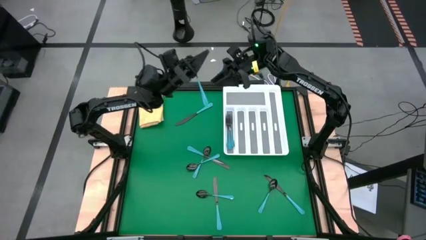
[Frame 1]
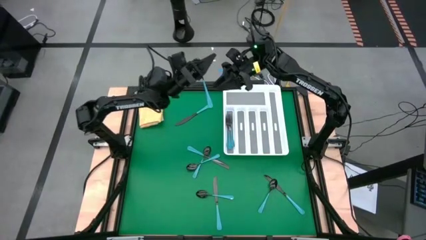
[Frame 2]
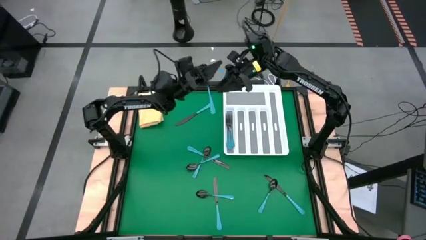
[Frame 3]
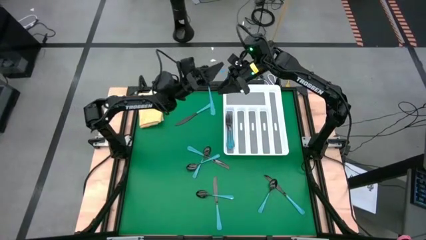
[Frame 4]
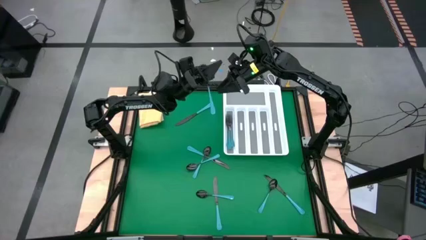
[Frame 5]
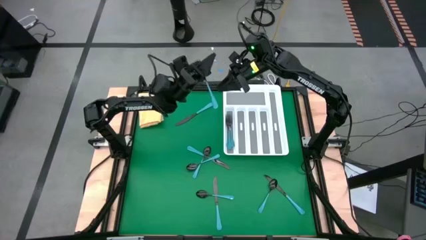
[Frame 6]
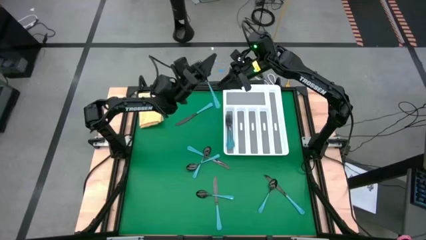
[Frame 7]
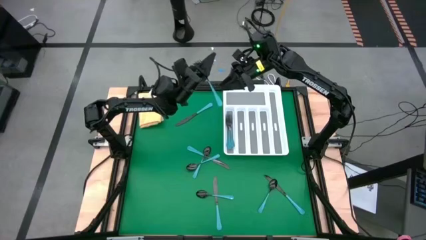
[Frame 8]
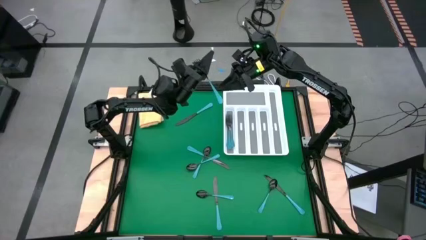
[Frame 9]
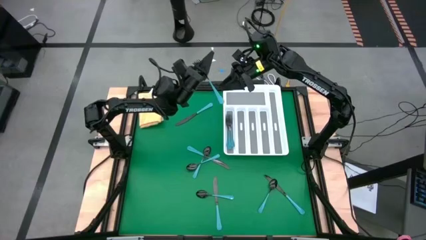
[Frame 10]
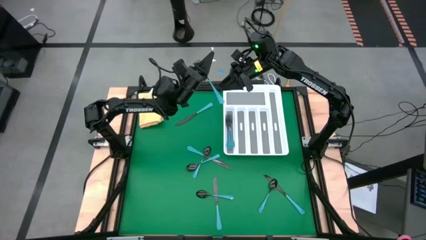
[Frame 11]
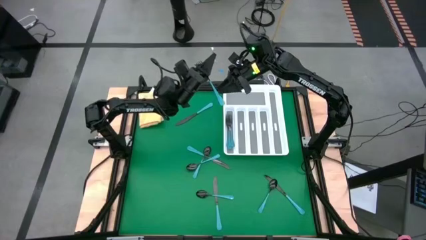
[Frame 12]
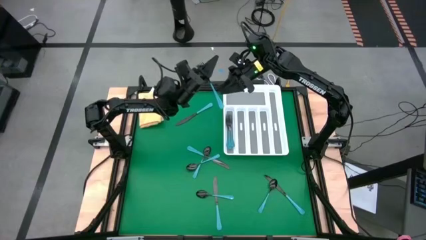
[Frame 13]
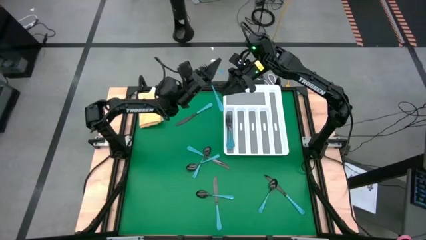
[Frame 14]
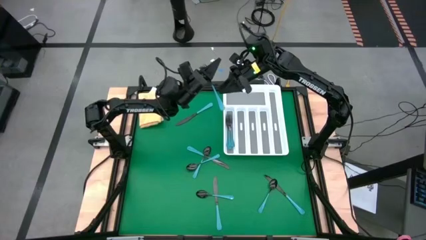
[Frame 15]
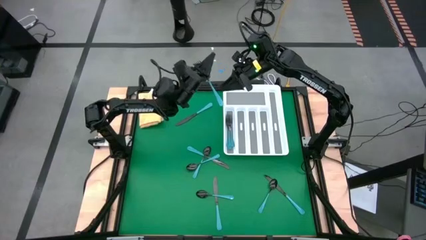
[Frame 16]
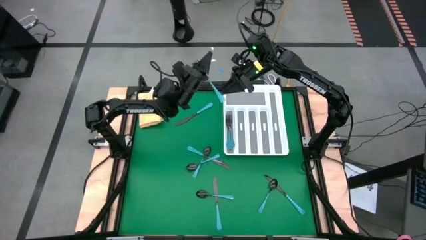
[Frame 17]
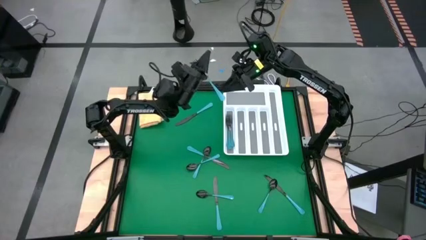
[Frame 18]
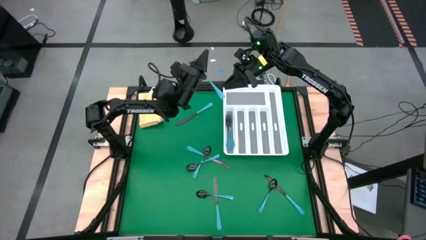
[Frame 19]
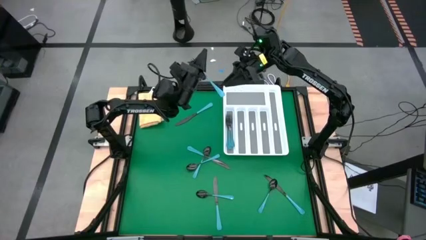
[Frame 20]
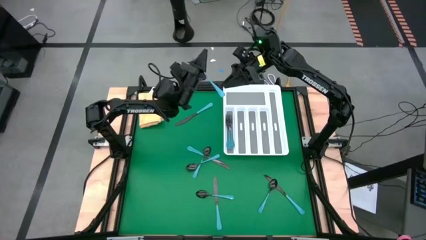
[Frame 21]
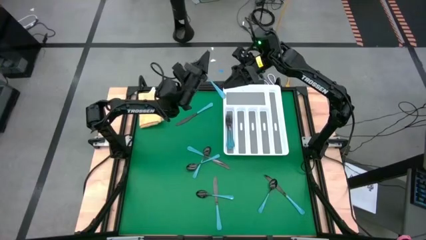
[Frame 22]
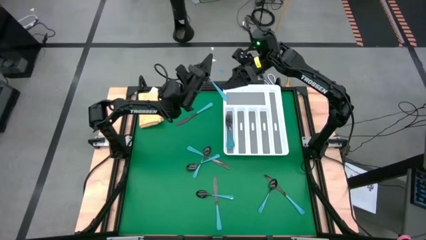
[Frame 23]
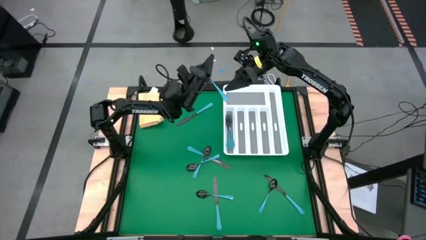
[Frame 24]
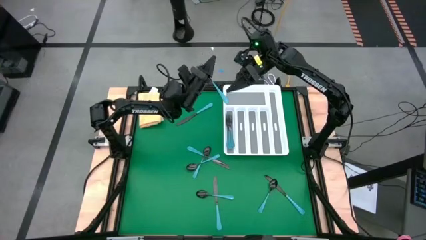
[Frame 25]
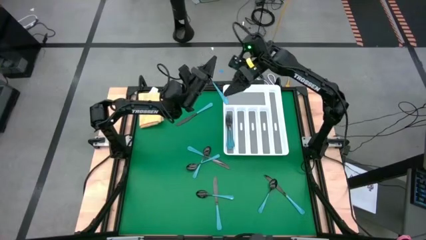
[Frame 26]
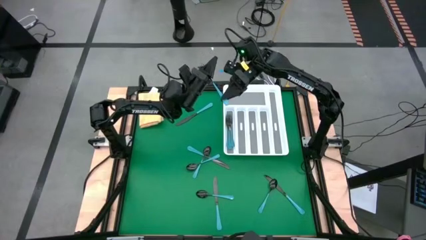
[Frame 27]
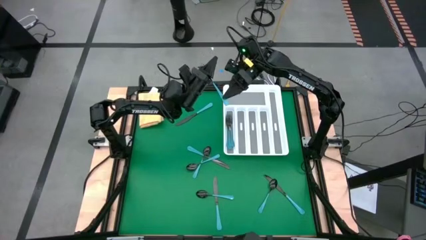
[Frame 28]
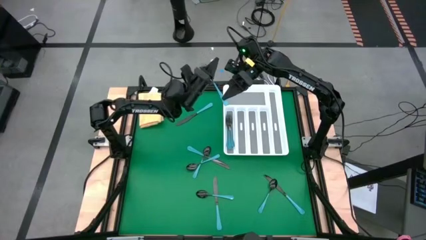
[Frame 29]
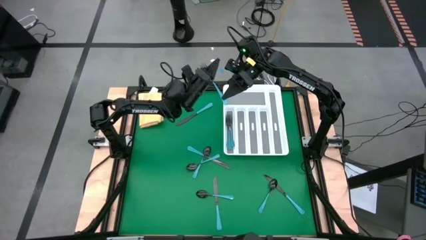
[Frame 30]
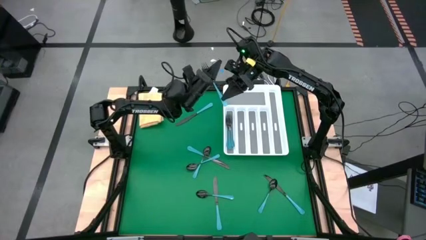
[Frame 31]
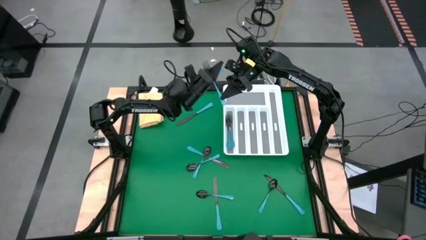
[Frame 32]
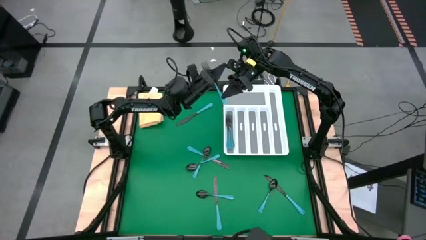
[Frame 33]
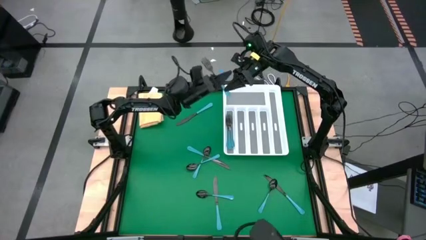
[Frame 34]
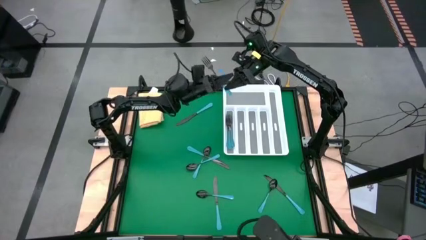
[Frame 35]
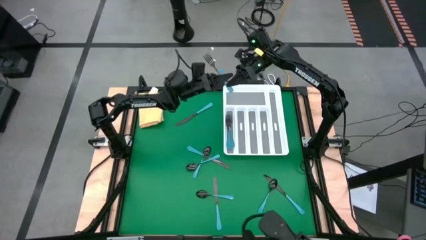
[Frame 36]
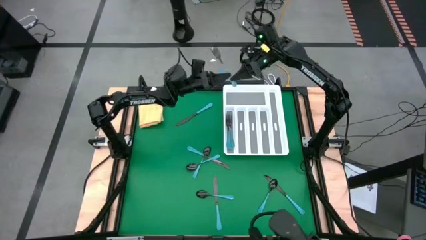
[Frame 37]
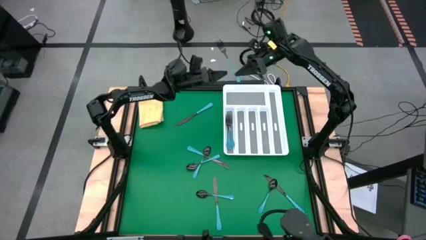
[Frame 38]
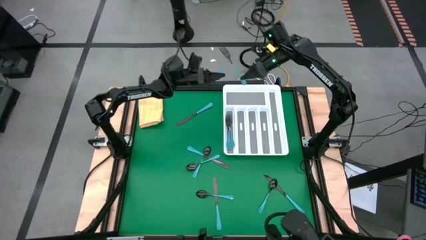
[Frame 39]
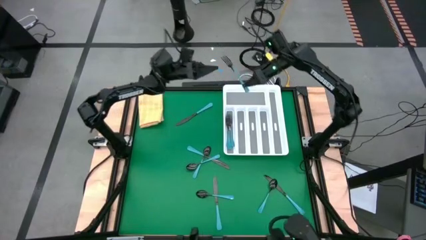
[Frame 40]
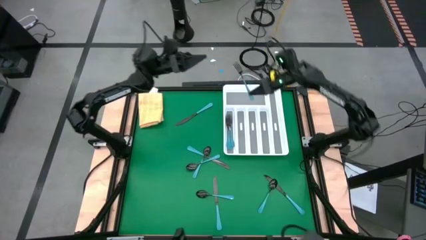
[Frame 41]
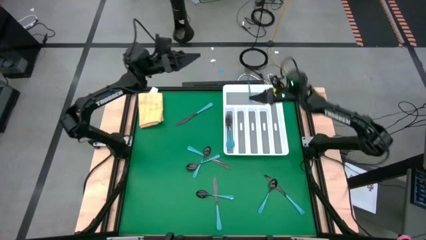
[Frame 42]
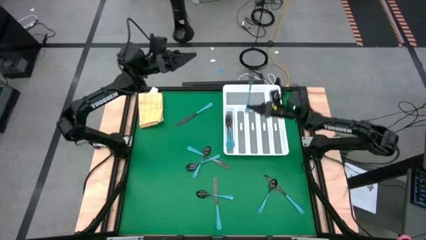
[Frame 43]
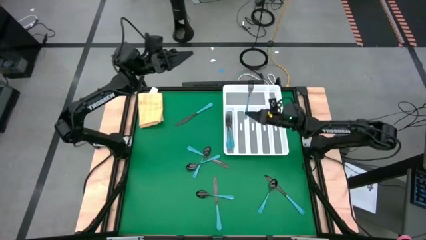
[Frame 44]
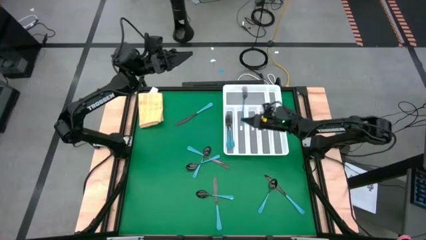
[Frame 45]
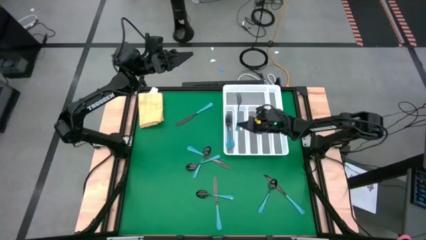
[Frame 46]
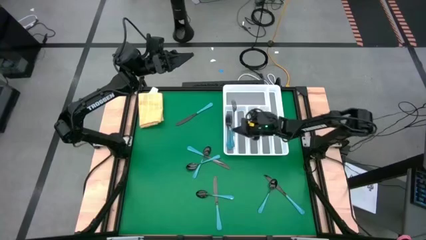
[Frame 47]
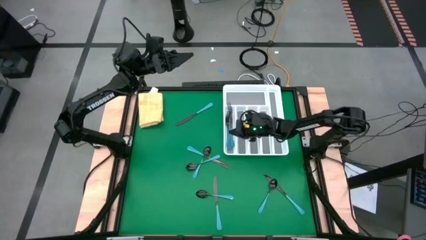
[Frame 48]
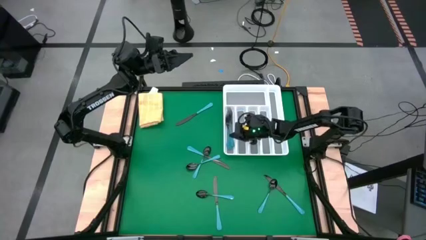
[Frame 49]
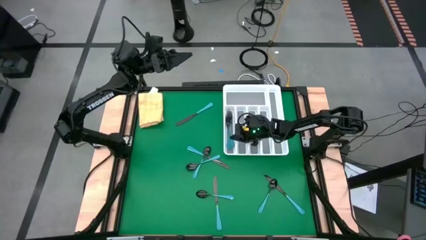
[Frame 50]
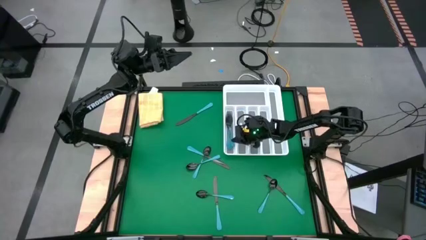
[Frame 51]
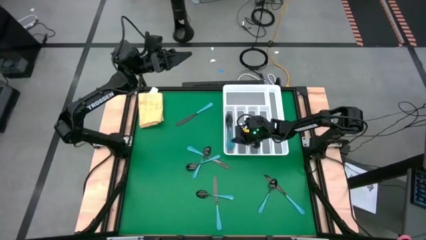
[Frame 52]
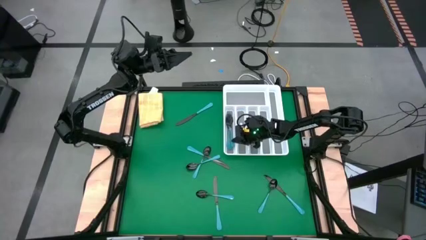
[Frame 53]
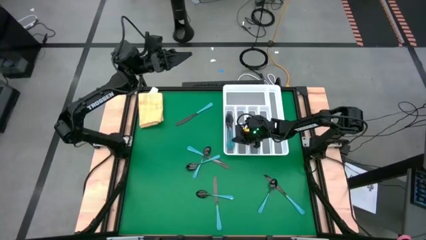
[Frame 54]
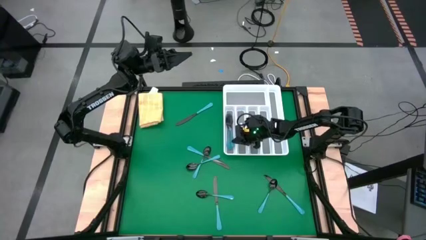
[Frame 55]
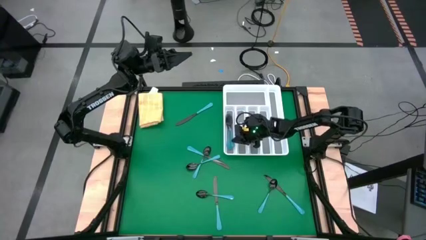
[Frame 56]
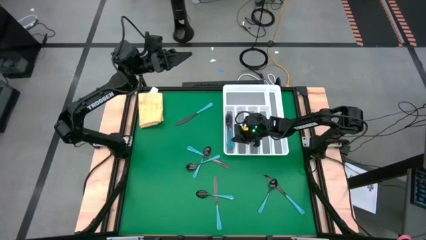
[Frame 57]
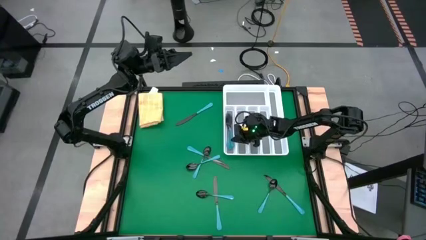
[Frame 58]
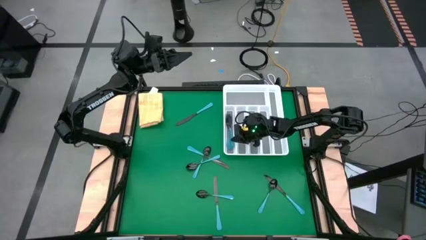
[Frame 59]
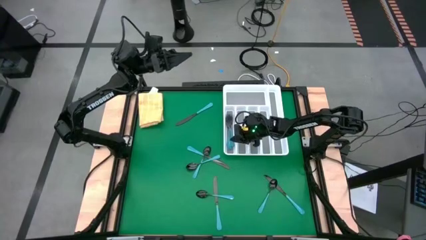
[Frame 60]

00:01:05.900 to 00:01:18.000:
Task: Sort silverware
Put the blue fork into the silverware organizer

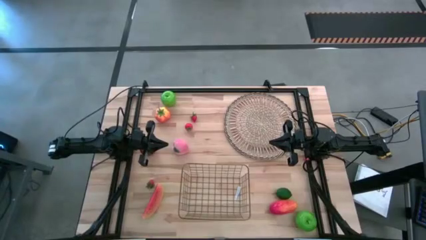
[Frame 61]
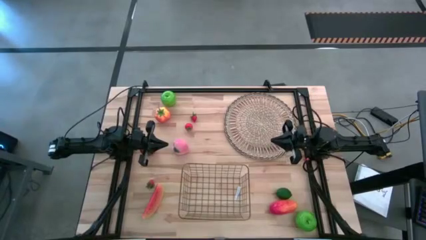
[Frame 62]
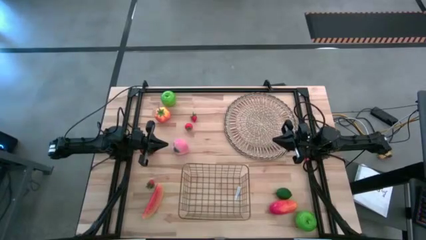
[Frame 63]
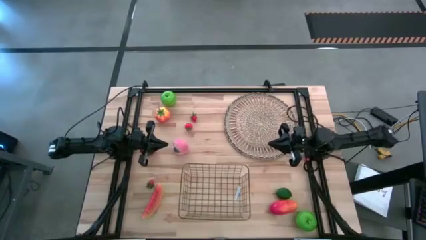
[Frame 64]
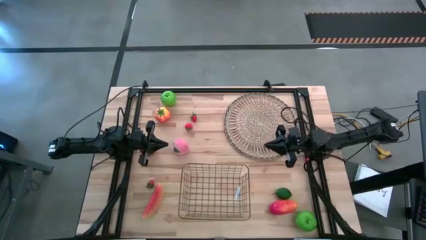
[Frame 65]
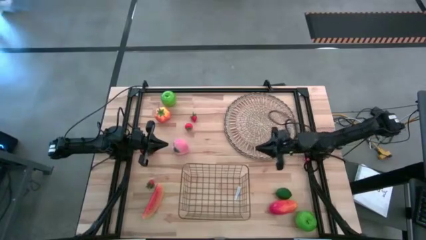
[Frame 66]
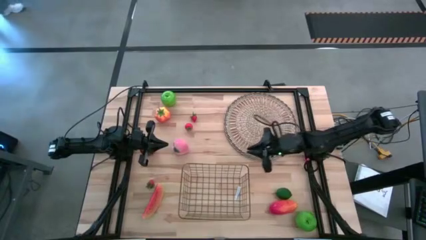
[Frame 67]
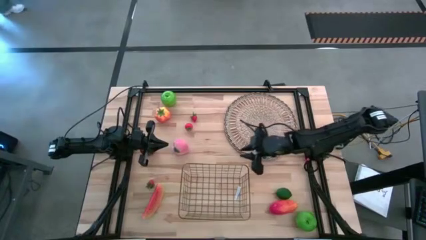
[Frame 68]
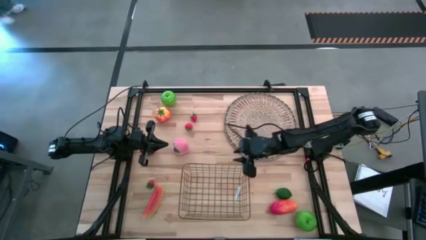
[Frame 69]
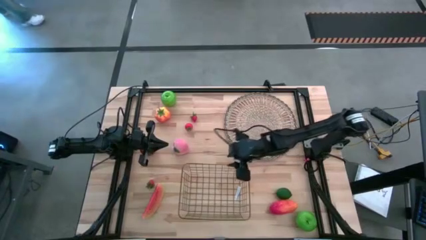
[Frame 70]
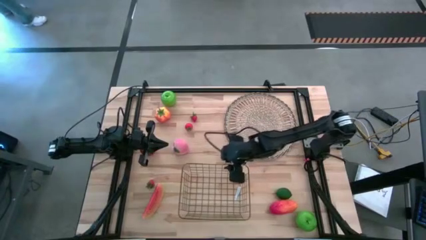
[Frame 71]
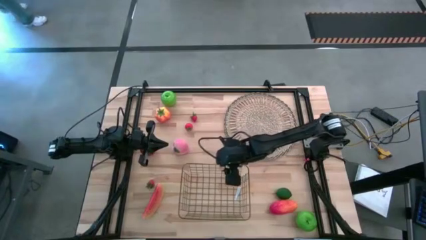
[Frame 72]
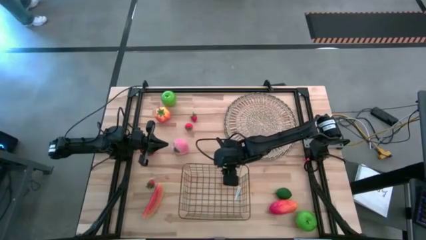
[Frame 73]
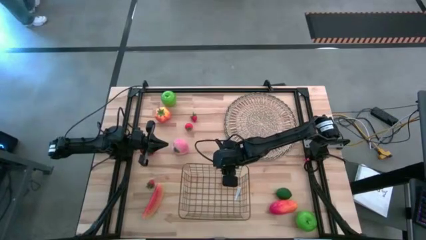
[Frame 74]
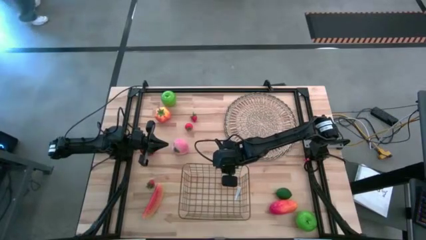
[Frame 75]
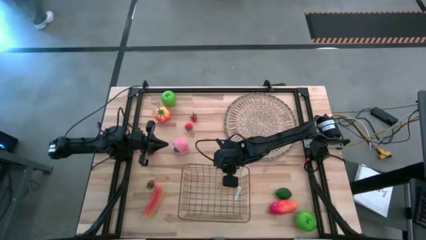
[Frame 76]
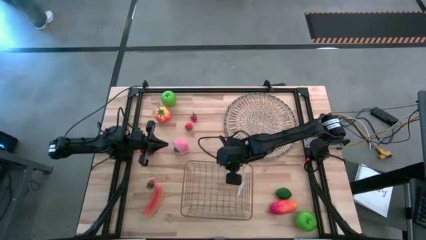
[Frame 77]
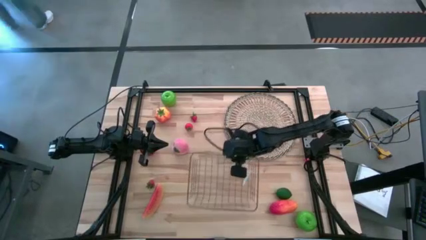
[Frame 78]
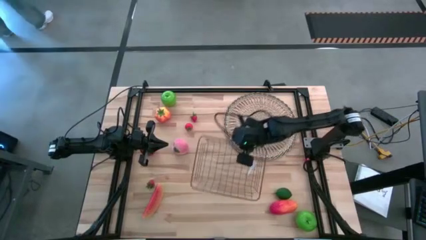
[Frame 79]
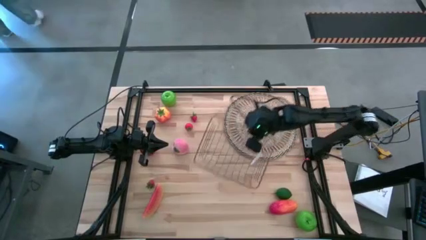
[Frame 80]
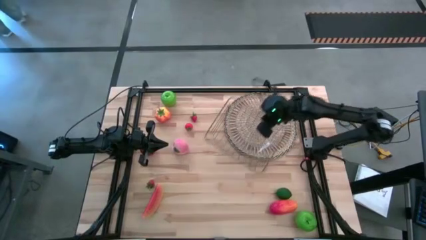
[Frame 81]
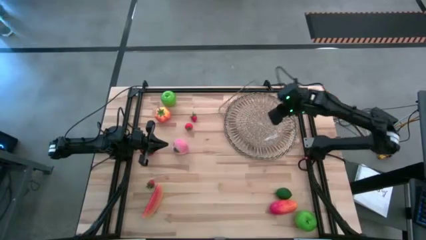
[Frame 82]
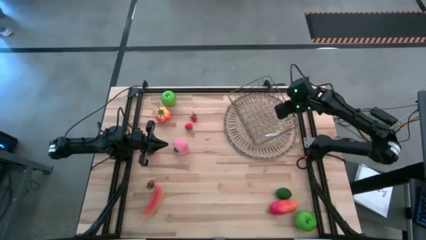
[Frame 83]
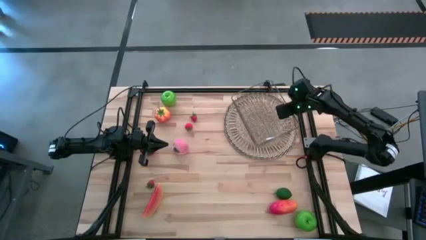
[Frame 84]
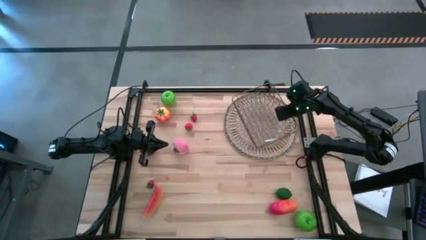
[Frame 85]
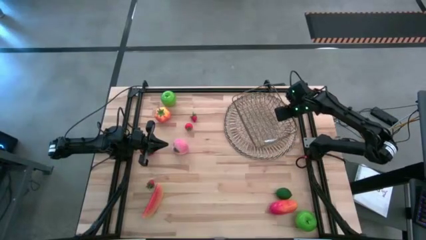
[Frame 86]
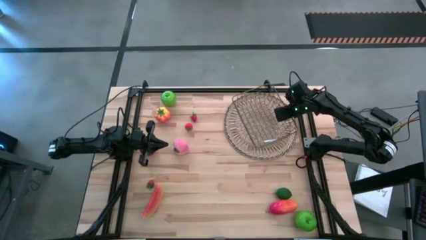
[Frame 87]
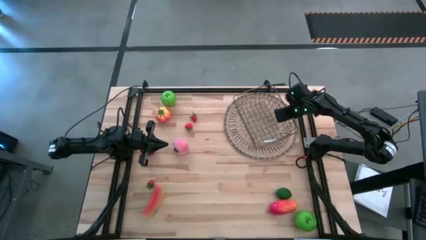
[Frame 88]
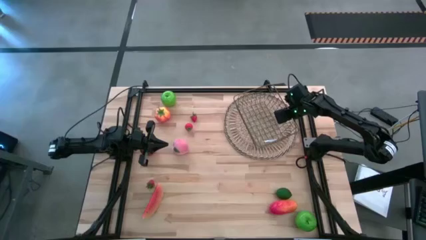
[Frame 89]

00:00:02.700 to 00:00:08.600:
Task: Build produce basket
Put the gold wire basket on the brown mat
